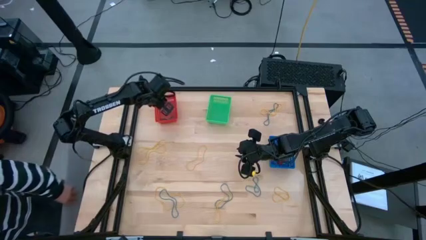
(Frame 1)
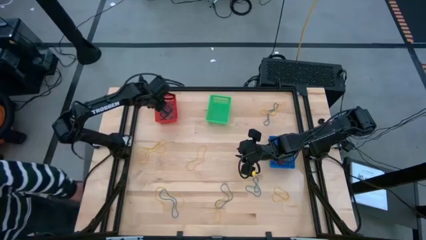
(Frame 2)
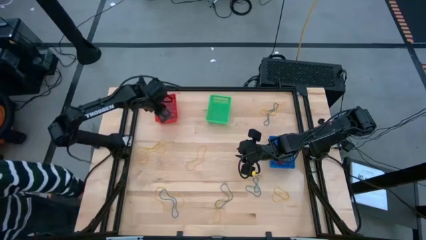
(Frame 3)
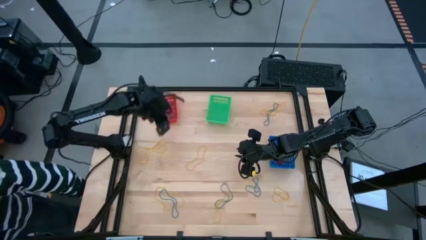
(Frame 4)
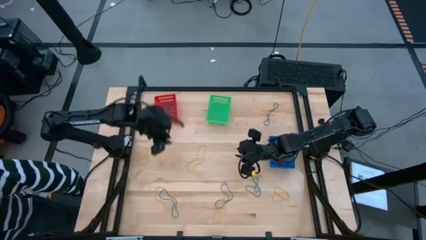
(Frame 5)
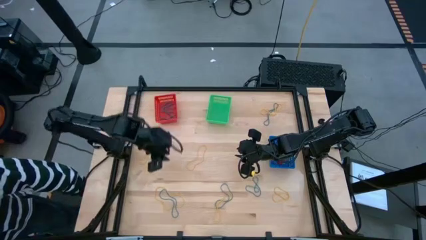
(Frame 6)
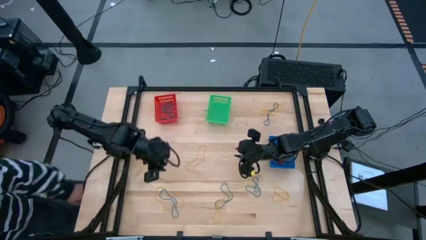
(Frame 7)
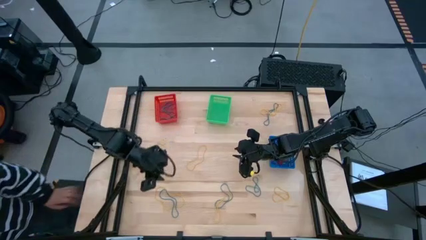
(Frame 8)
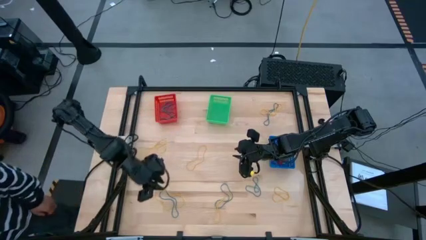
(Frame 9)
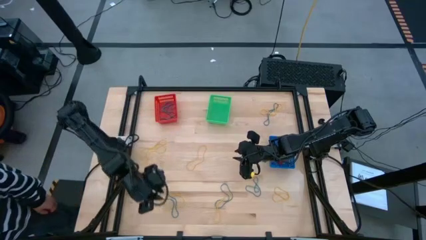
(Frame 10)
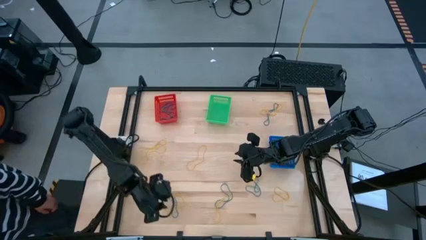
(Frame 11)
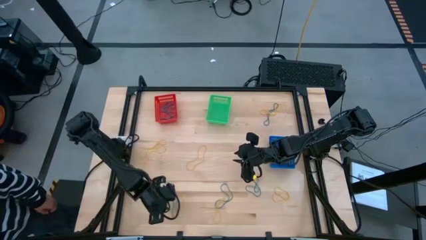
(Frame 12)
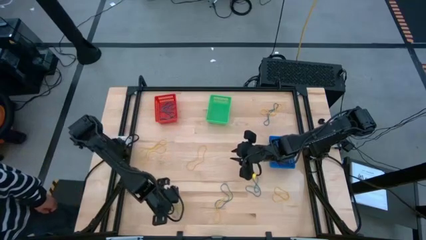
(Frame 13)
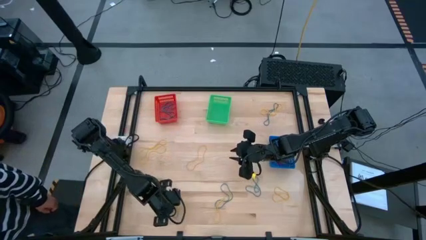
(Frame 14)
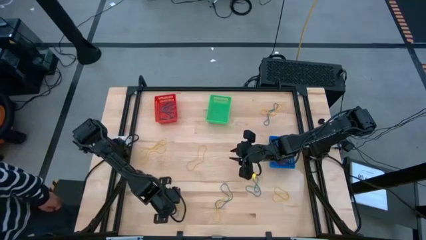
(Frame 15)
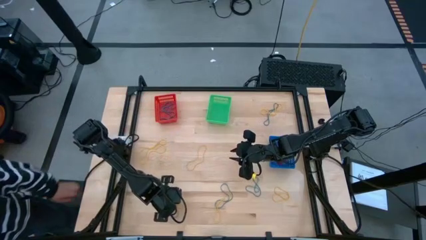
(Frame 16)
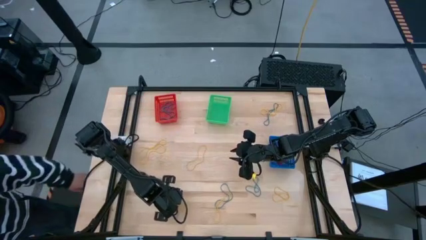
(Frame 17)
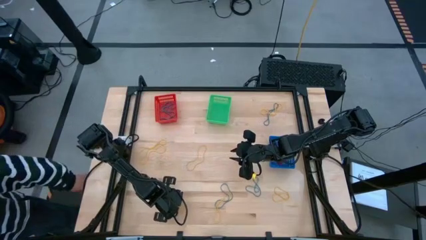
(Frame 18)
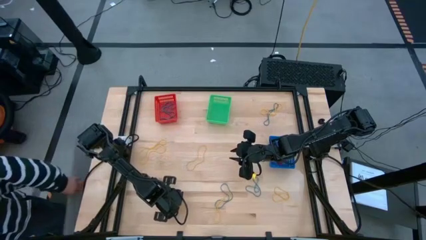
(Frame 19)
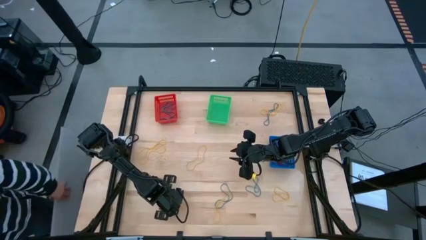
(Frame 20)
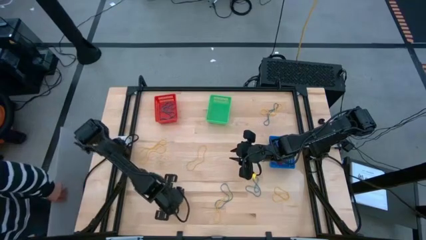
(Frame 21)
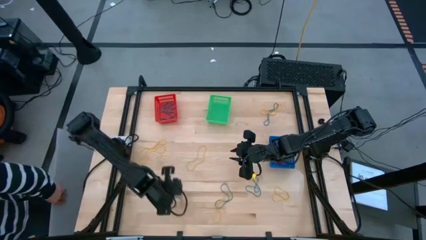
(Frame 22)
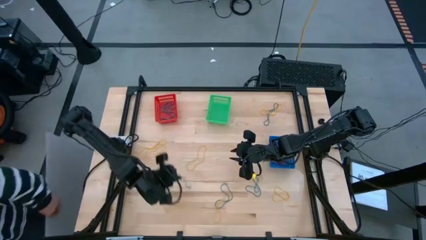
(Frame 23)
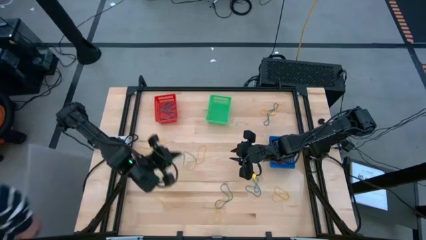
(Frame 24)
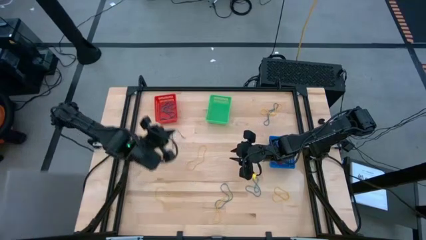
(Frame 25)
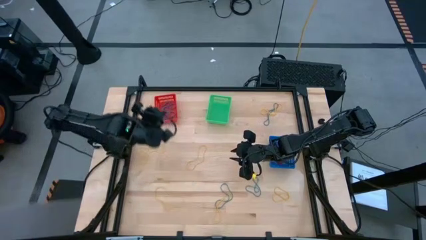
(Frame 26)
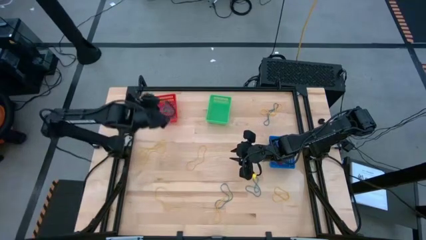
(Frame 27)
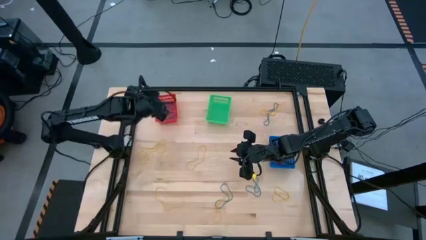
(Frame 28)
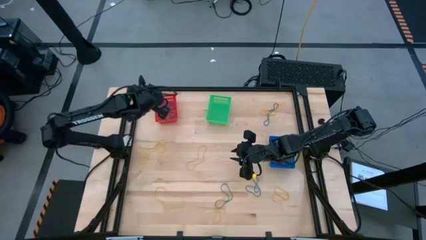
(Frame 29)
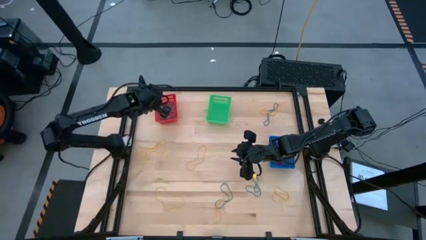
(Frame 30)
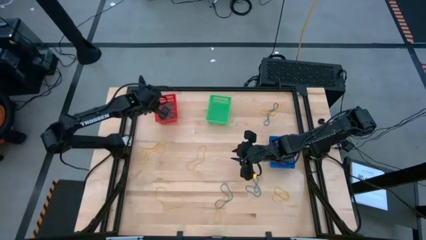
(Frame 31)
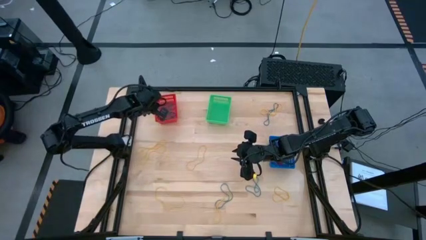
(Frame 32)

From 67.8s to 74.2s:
Task: Sort rubber bands into baskets
Put the blue rubber band into the red bin

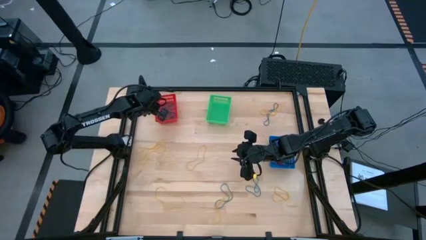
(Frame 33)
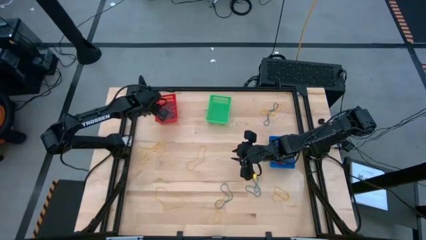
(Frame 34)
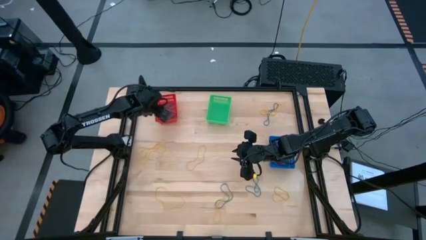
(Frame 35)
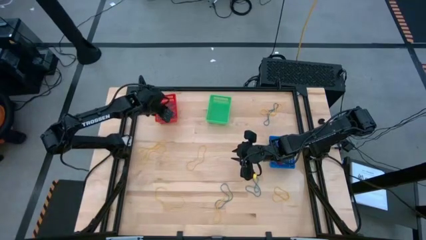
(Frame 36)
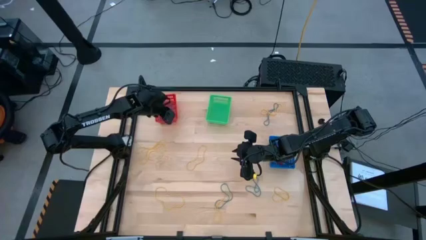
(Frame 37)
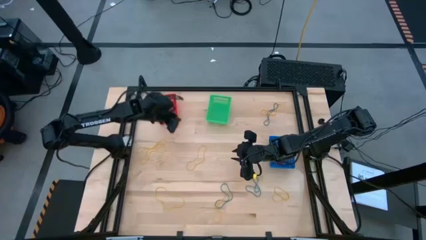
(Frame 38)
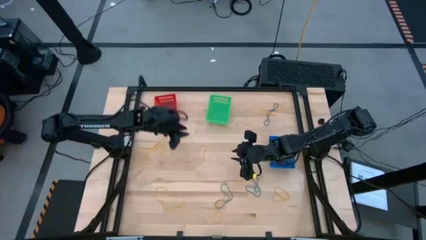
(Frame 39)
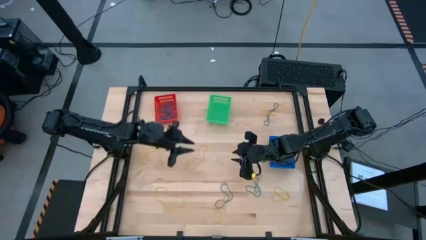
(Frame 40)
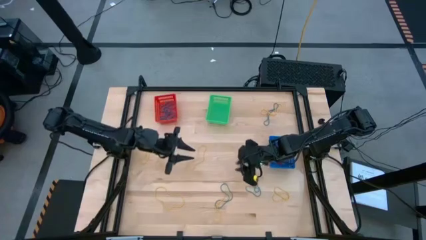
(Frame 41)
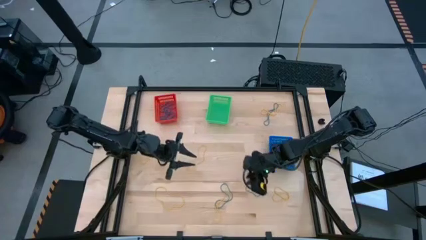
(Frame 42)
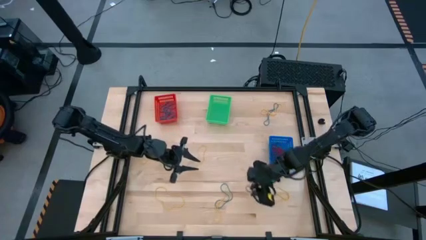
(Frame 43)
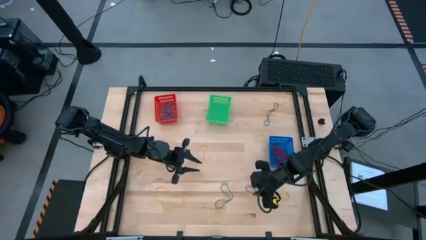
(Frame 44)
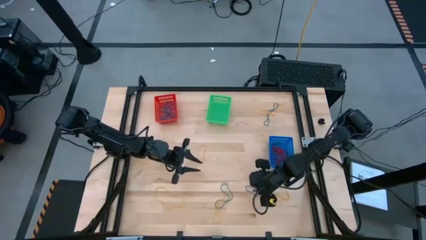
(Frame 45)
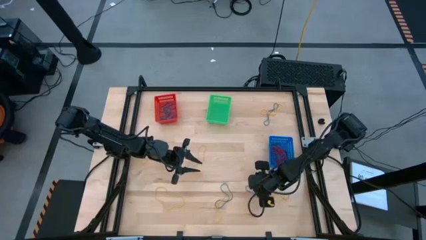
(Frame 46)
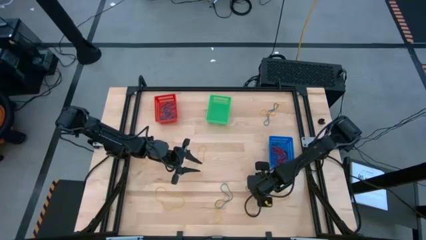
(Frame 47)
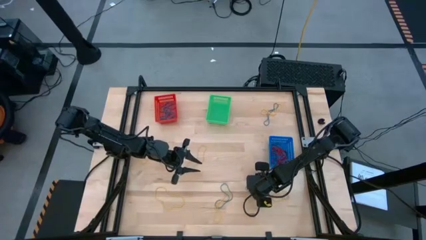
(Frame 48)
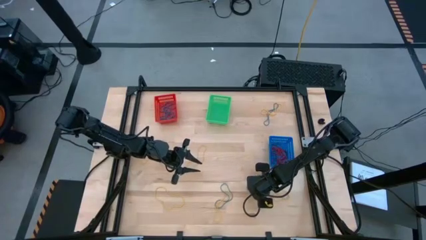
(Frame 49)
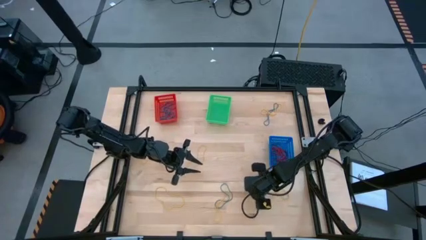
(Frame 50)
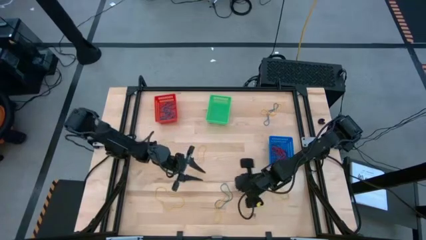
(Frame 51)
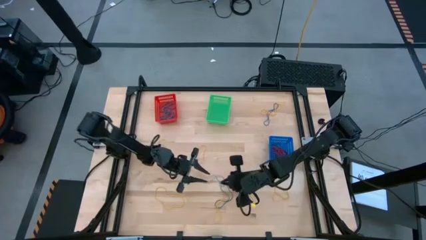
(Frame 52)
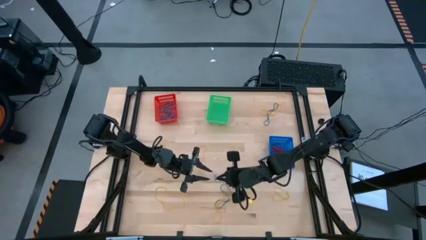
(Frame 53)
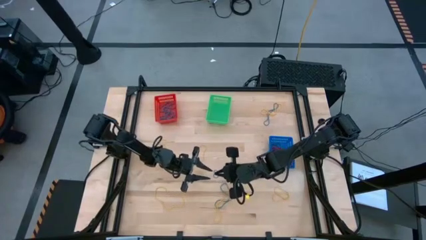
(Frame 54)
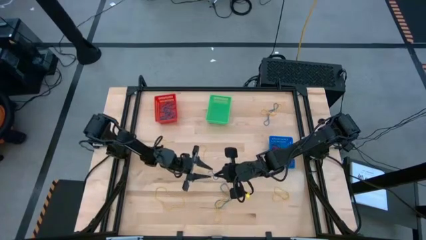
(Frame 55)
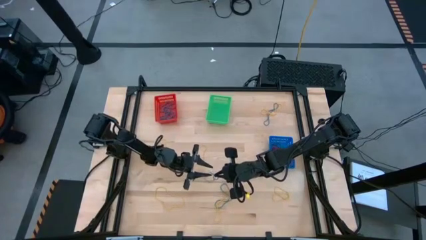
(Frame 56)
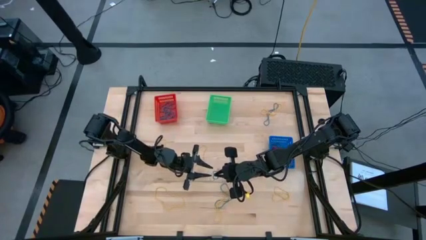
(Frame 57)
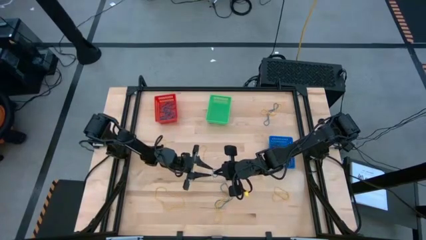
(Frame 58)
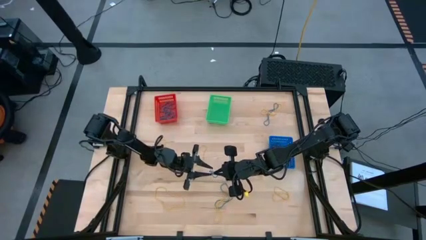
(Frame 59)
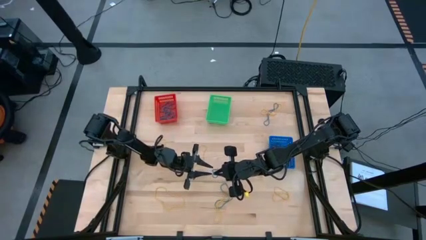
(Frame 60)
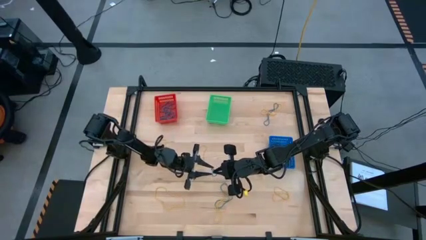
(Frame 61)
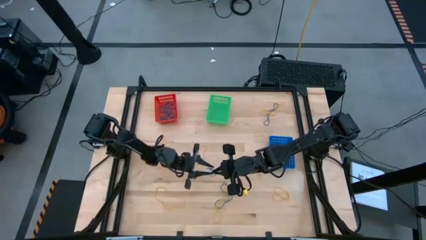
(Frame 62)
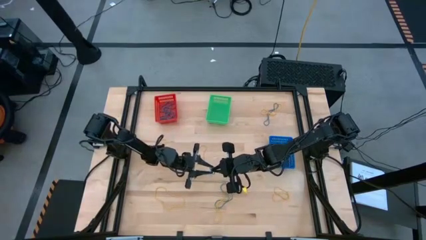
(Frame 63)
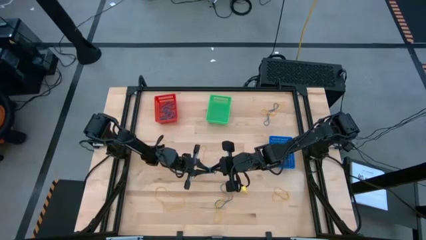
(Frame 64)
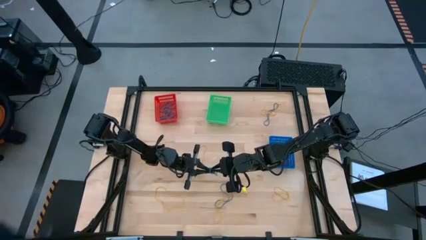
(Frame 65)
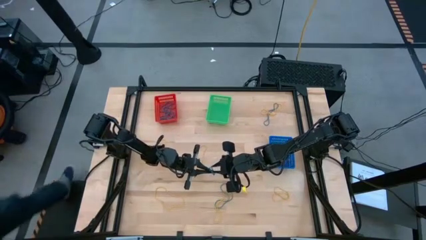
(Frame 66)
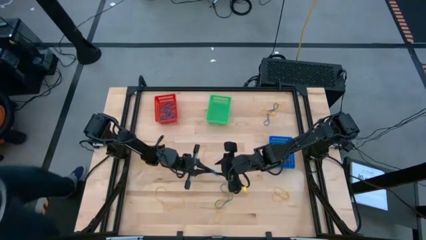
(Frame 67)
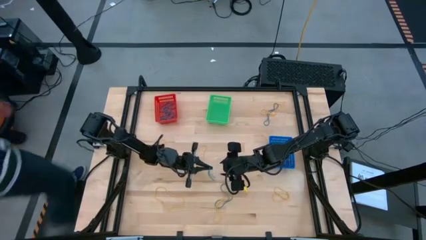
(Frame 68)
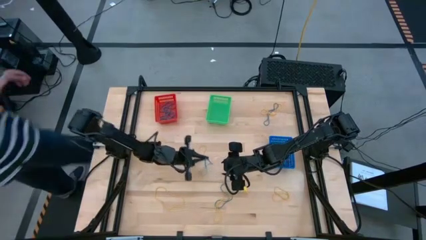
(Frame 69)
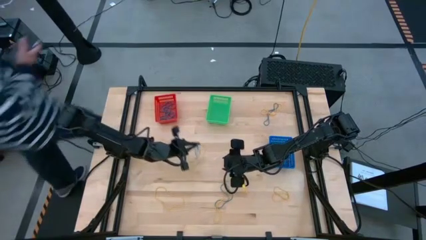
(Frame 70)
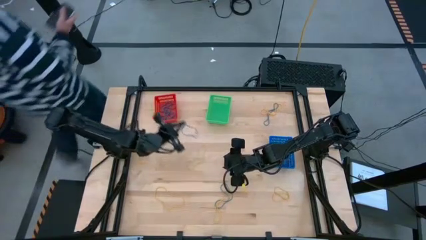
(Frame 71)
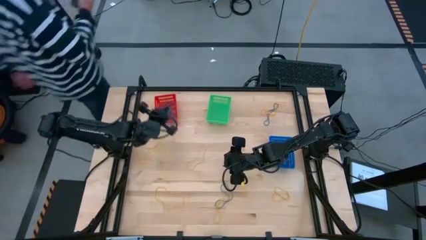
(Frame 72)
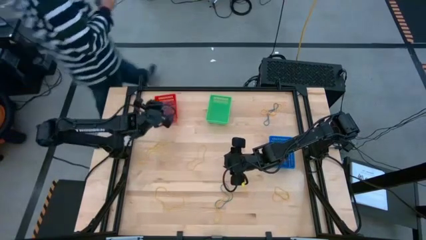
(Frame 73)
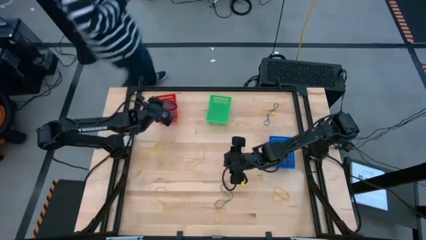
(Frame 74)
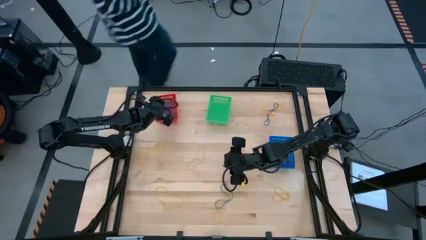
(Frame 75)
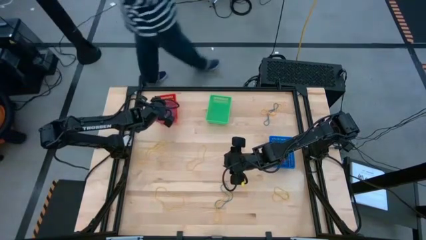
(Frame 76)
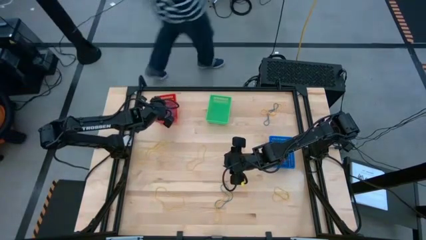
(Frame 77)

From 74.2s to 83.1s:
Put the blue rubber band into the red bin
